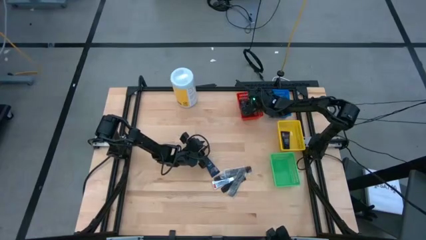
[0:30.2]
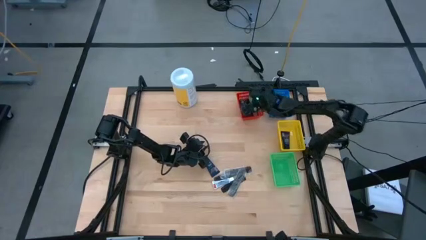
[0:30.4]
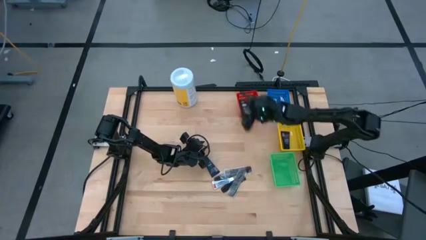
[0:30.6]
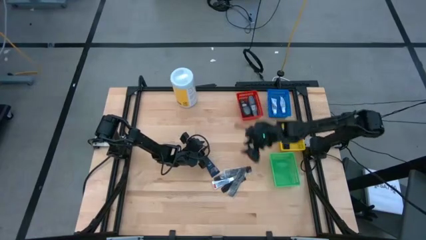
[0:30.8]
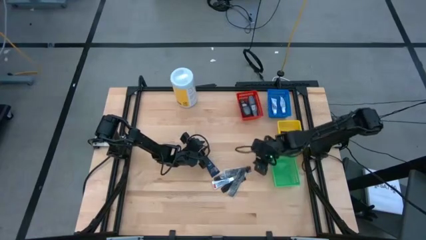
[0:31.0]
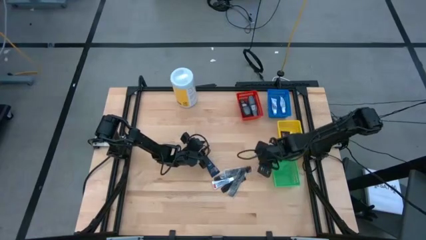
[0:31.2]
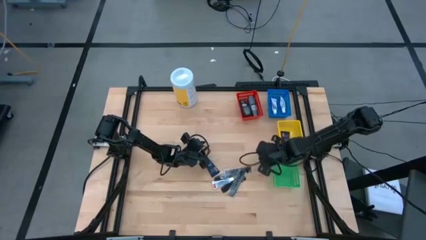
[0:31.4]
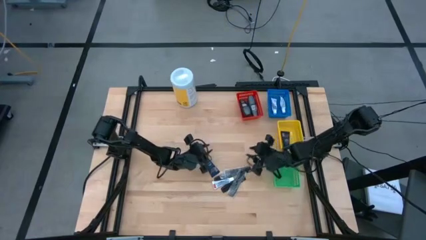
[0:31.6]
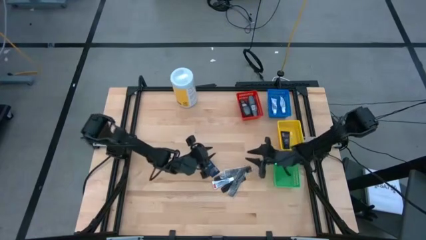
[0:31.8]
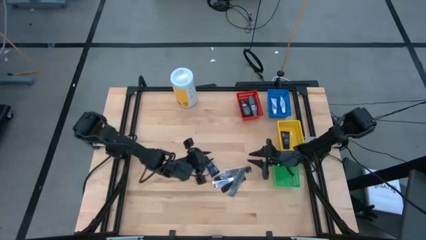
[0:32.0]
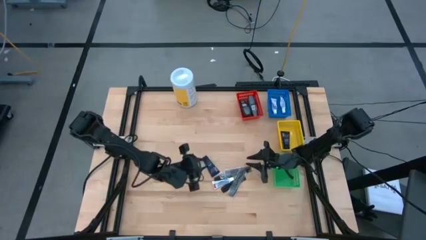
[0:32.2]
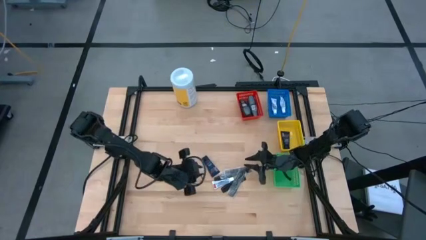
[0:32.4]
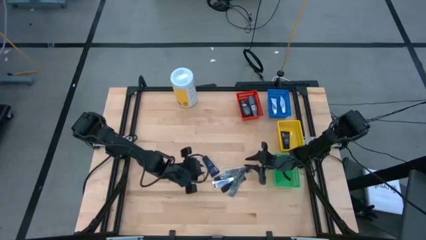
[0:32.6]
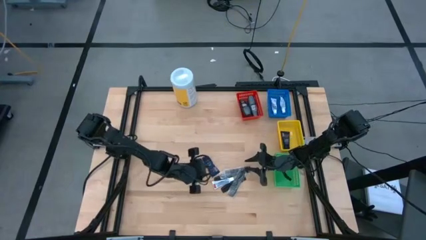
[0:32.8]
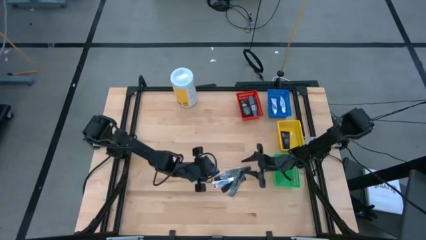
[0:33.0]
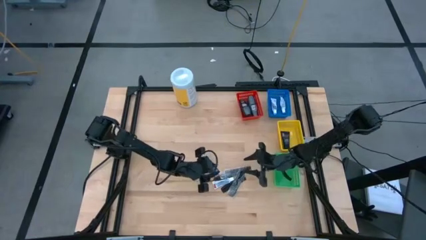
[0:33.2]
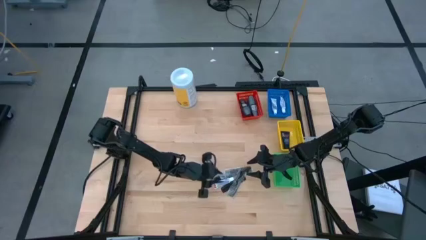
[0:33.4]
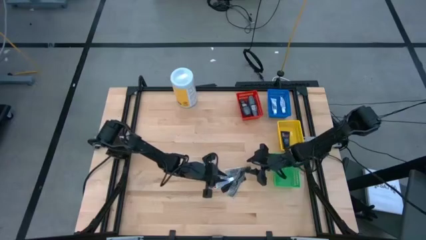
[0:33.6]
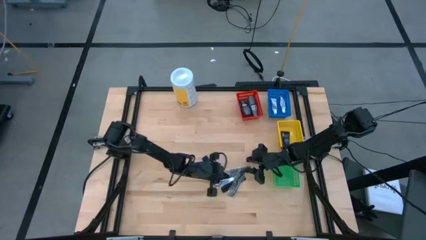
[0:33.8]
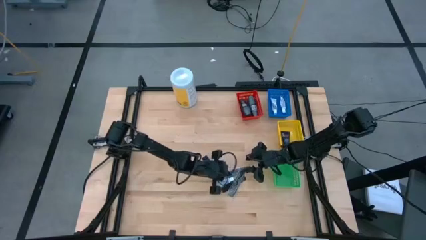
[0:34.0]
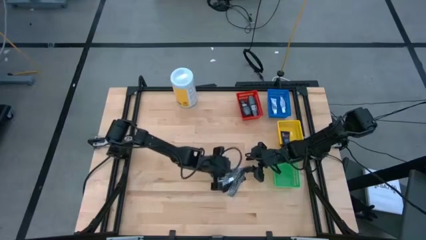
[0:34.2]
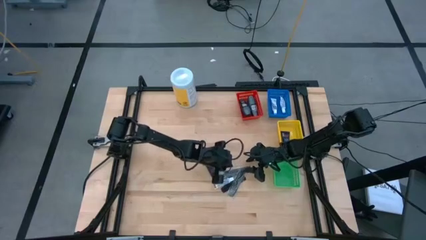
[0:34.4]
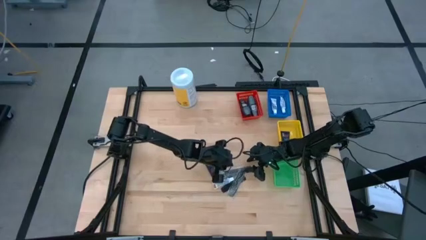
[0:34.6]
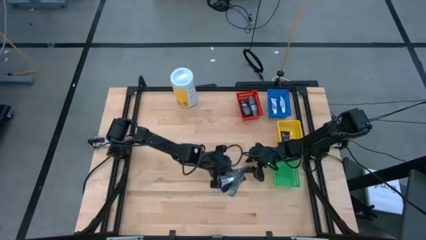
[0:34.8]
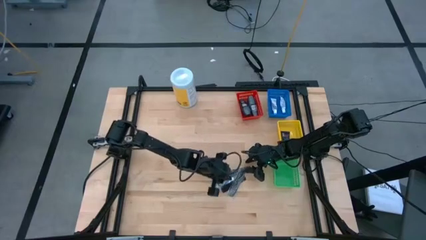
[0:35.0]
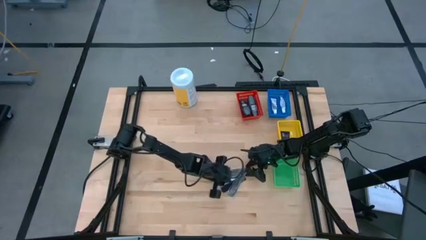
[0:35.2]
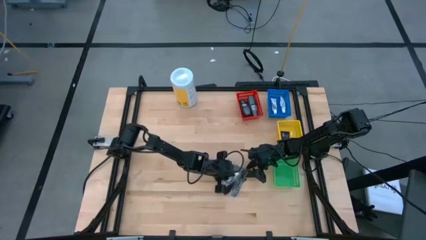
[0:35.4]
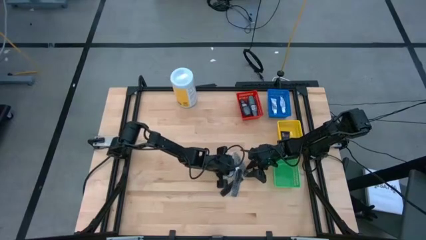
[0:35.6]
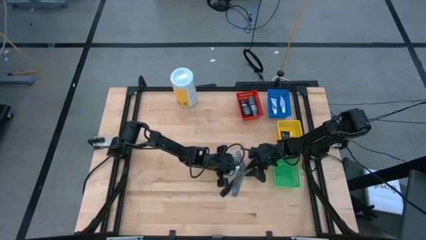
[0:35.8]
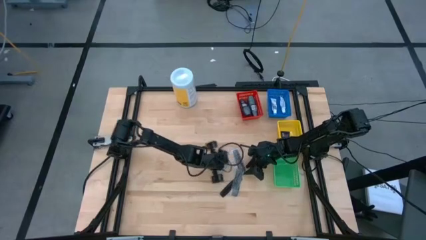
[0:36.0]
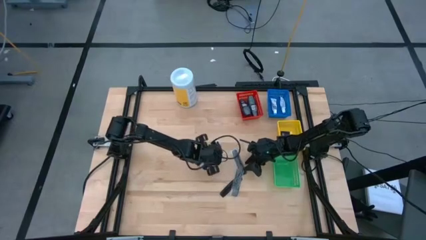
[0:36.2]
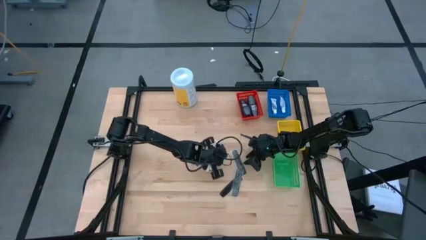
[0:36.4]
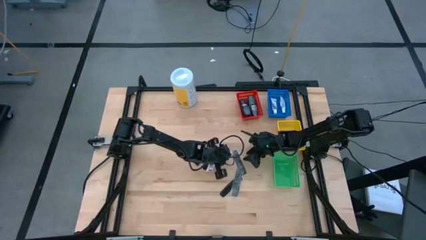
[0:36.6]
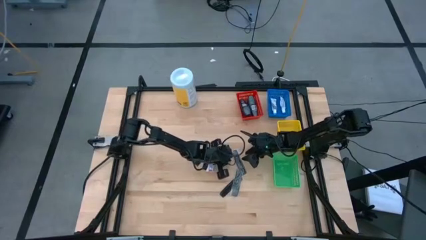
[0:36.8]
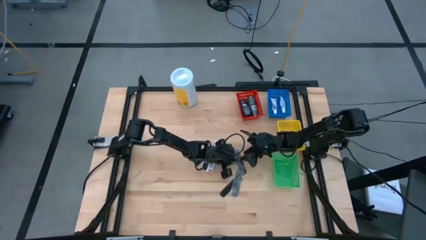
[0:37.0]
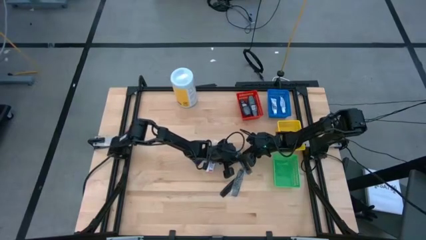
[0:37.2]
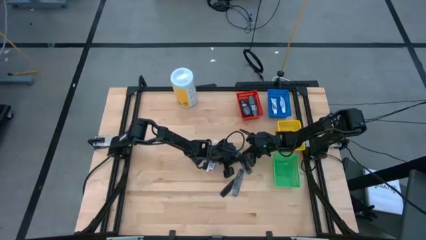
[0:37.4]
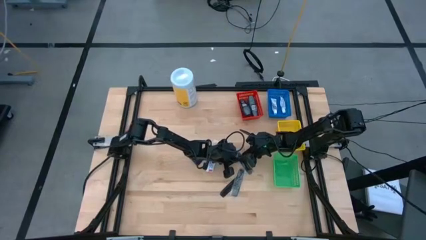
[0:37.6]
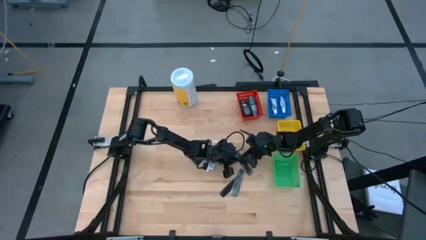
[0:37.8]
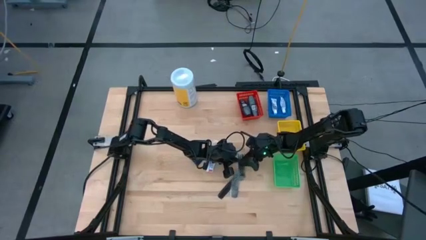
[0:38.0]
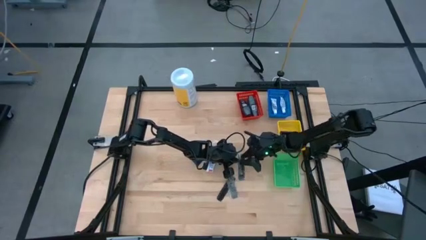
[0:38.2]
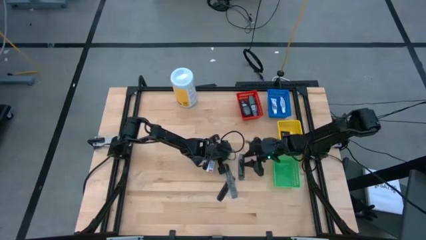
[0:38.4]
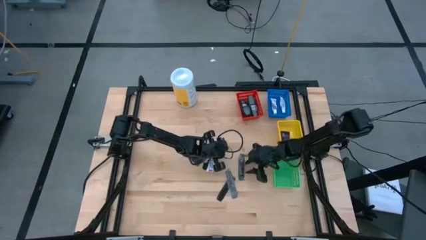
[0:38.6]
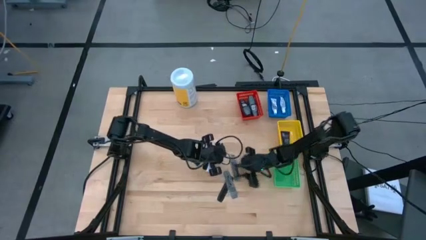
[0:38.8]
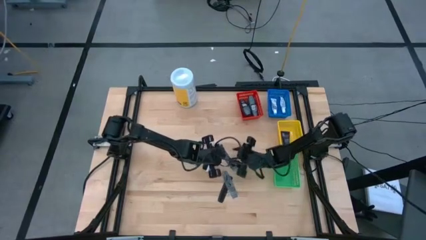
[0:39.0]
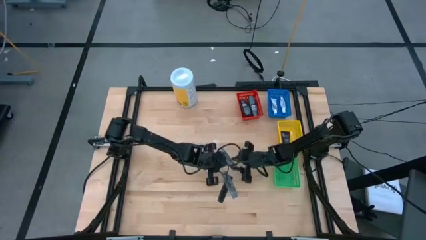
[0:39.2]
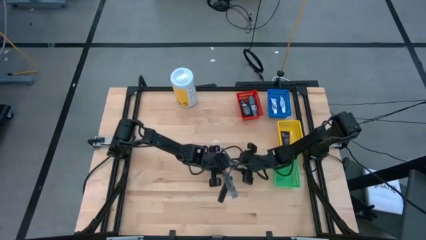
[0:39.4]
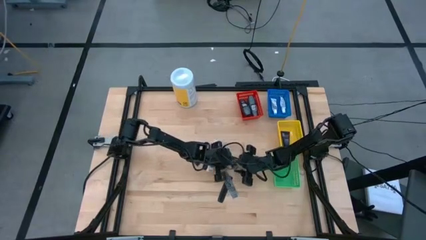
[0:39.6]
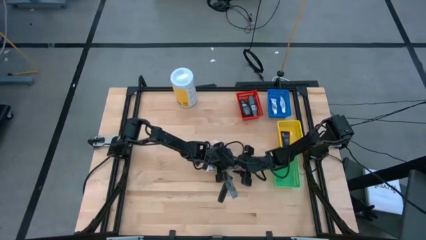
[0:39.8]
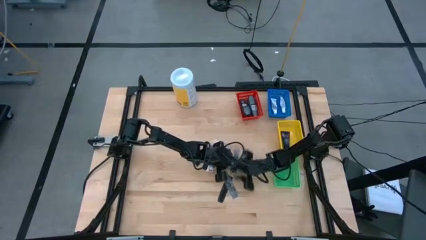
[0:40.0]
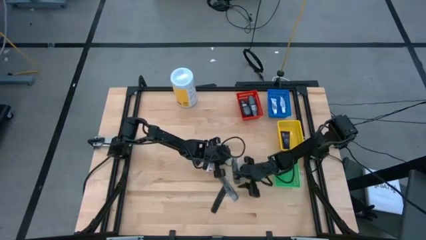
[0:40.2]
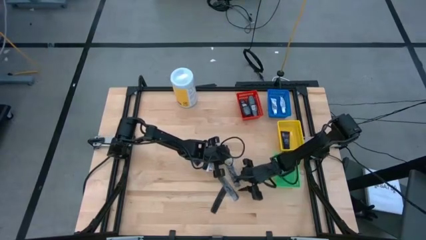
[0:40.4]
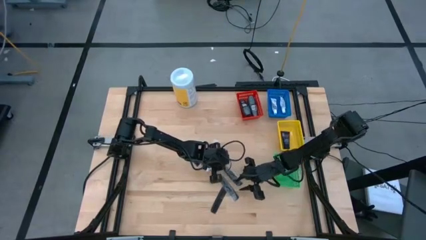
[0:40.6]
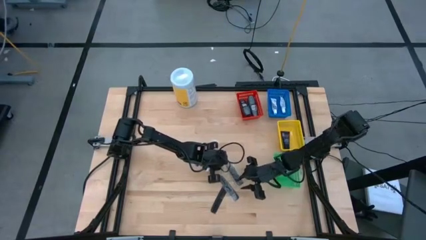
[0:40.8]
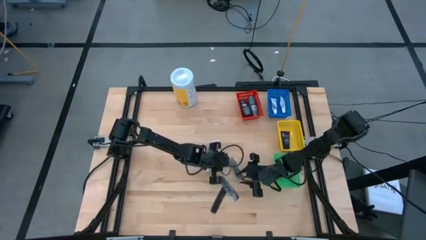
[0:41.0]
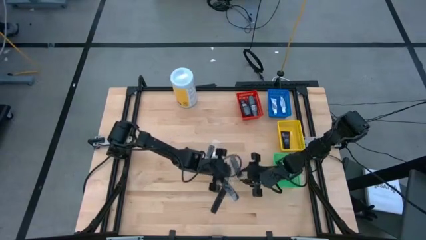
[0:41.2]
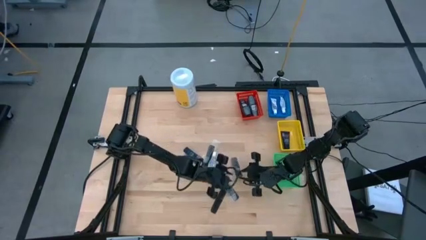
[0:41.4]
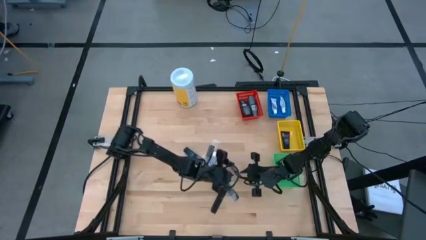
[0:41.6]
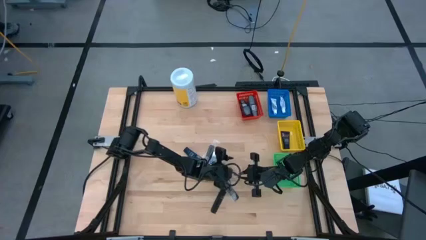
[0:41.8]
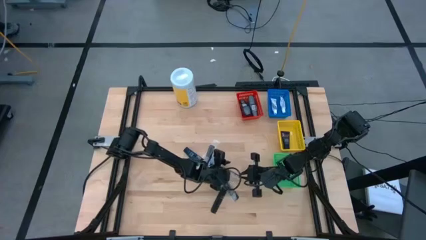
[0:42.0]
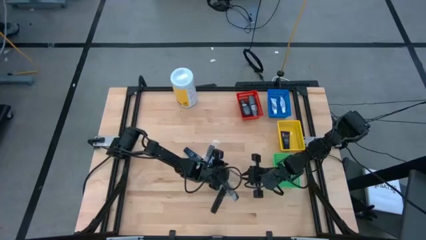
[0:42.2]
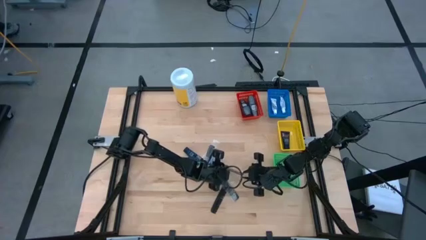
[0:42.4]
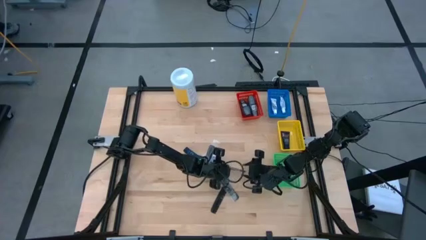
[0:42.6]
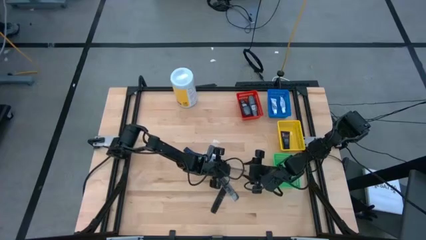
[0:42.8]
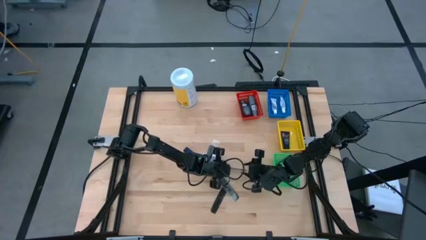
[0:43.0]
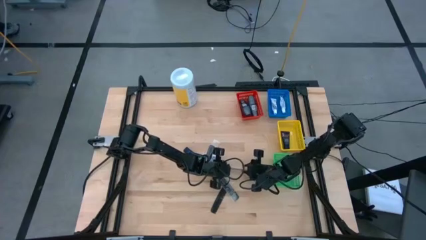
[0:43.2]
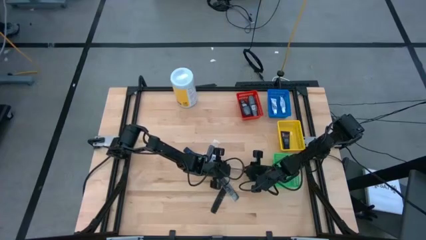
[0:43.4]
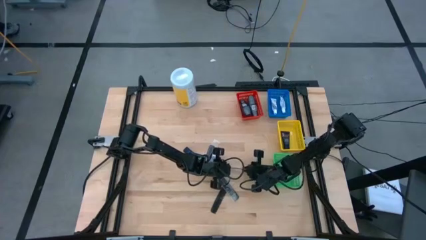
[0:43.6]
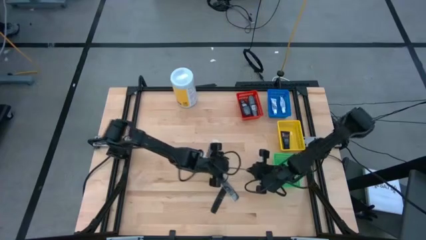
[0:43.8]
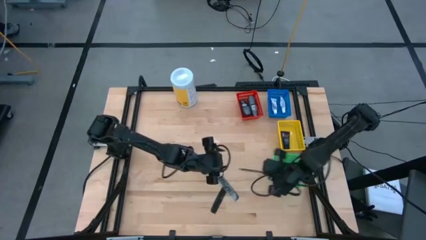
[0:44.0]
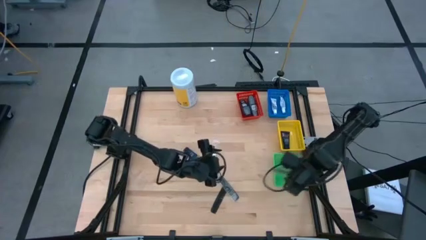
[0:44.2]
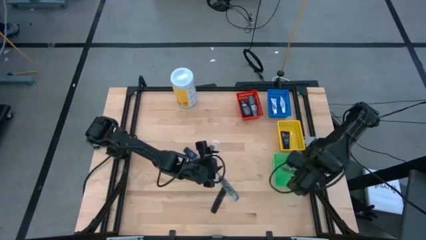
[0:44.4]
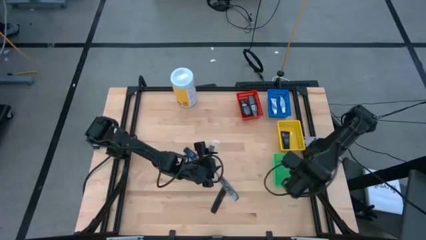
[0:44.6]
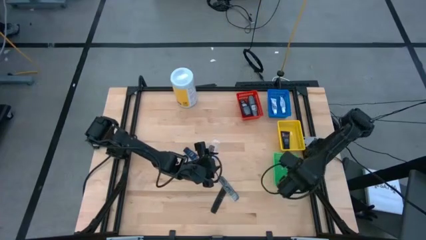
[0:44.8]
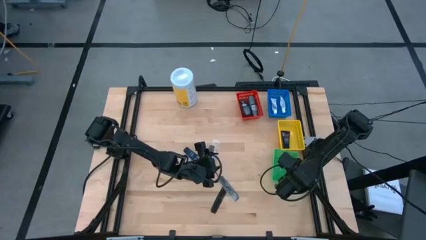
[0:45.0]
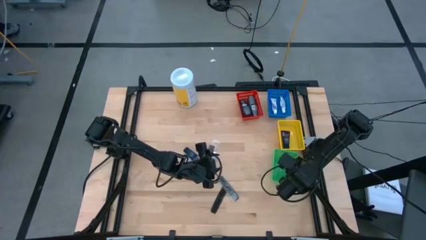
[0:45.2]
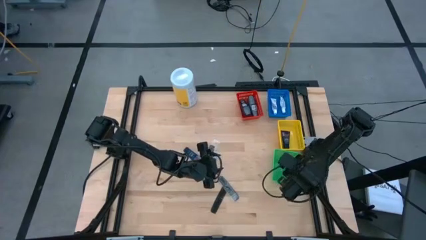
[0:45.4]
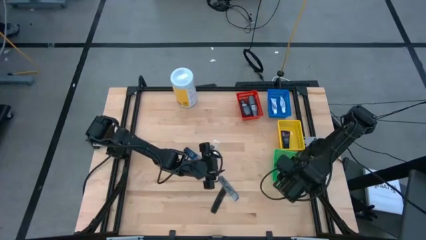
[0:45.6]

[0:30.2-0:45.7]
Task: Pick & Place Travel size toiletries
Put the black comb into the green bin
